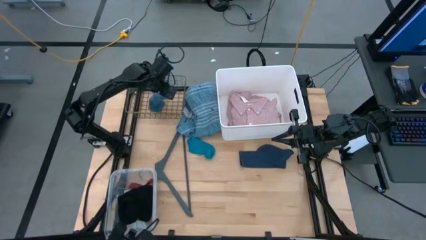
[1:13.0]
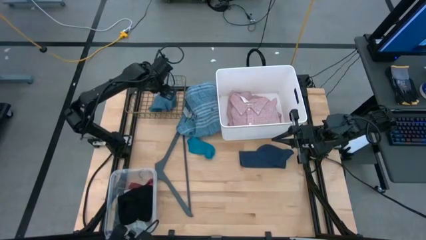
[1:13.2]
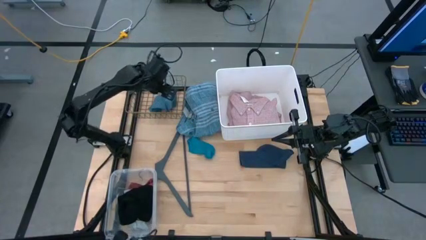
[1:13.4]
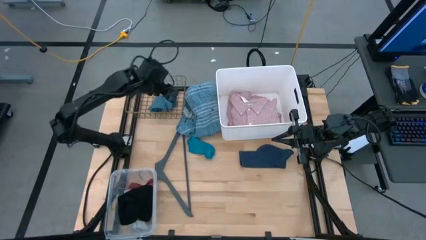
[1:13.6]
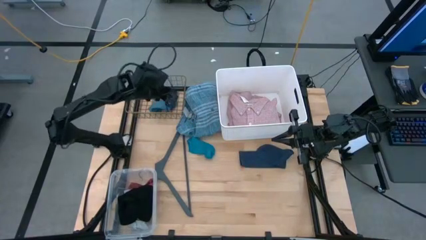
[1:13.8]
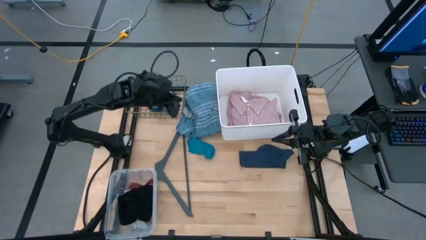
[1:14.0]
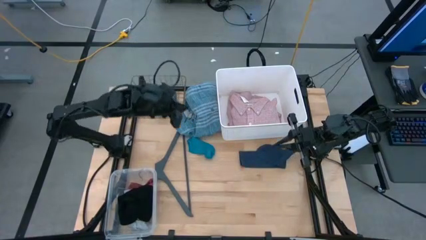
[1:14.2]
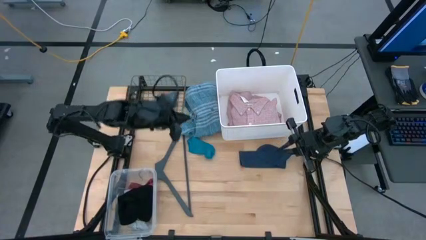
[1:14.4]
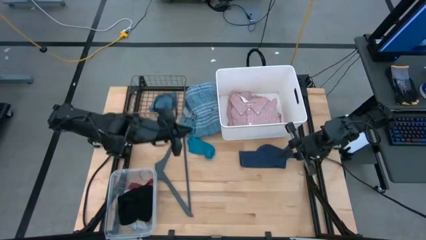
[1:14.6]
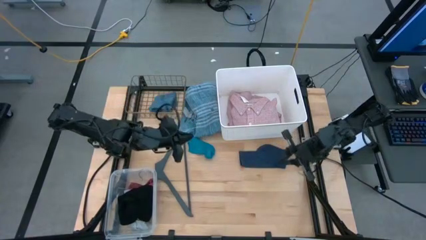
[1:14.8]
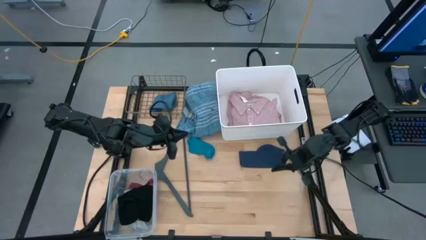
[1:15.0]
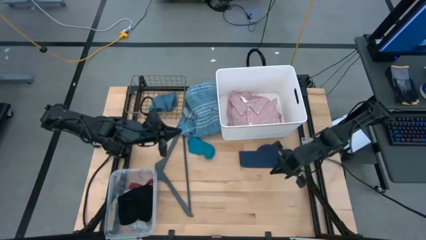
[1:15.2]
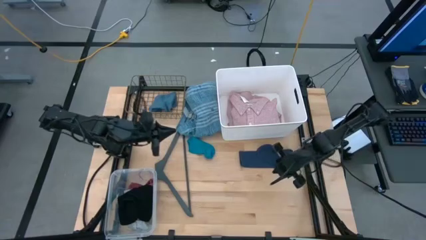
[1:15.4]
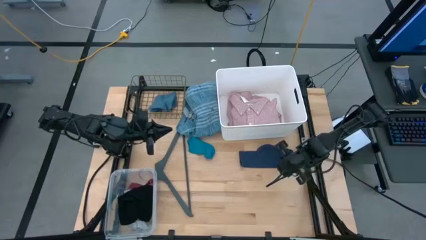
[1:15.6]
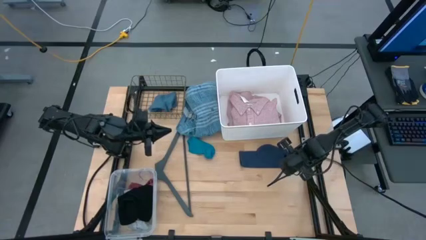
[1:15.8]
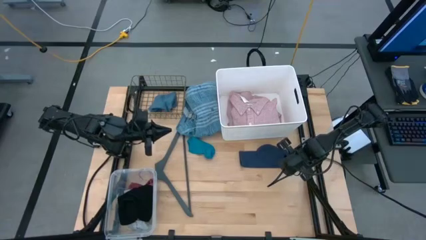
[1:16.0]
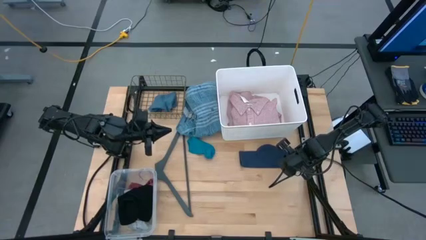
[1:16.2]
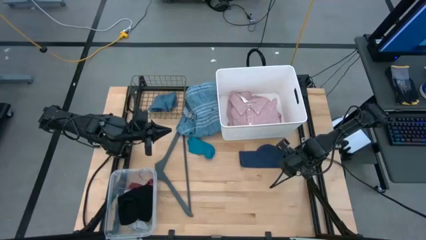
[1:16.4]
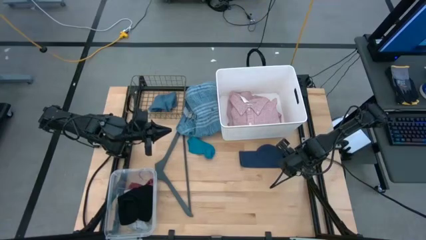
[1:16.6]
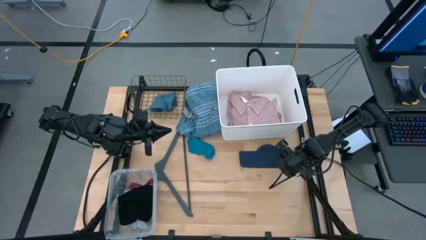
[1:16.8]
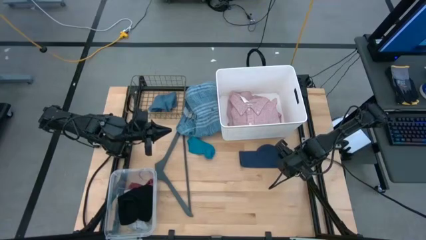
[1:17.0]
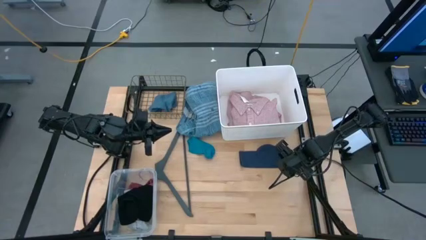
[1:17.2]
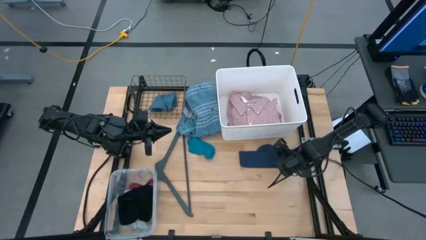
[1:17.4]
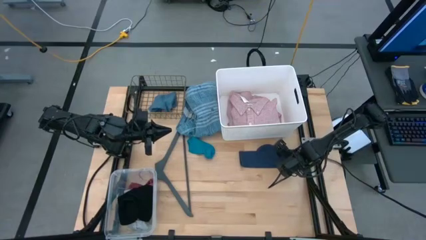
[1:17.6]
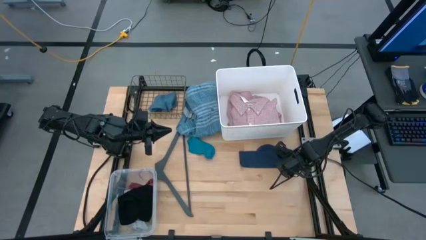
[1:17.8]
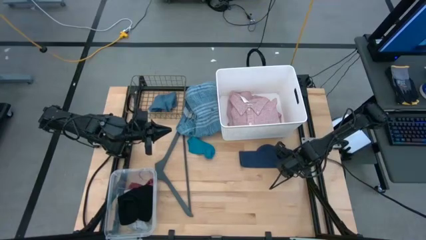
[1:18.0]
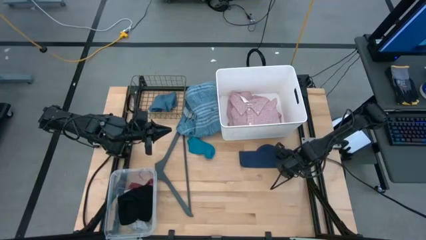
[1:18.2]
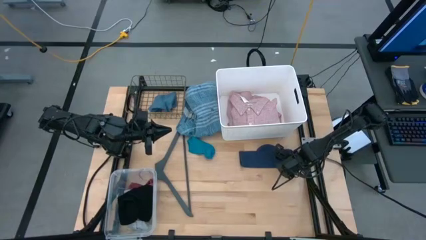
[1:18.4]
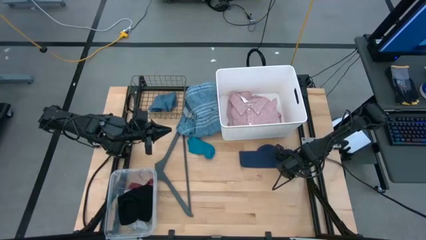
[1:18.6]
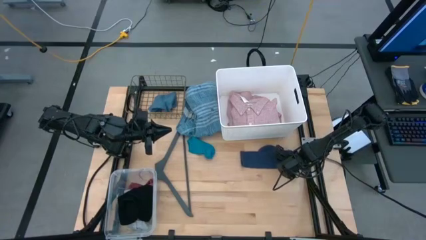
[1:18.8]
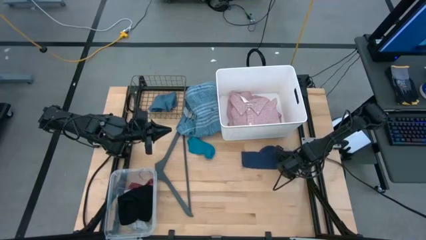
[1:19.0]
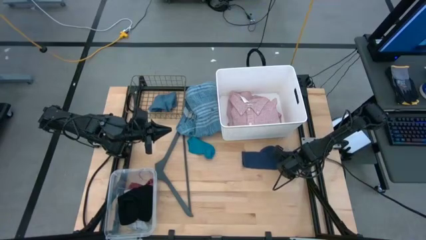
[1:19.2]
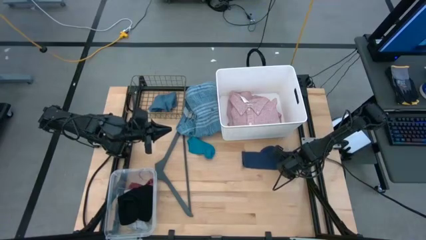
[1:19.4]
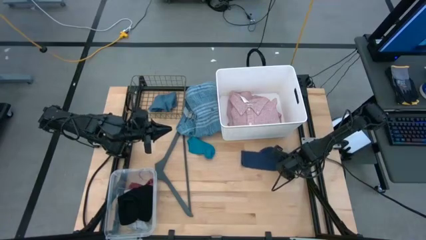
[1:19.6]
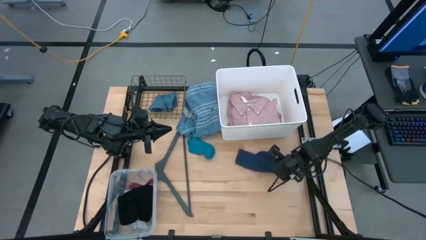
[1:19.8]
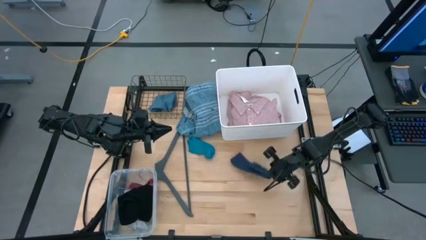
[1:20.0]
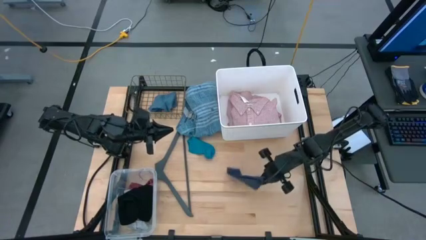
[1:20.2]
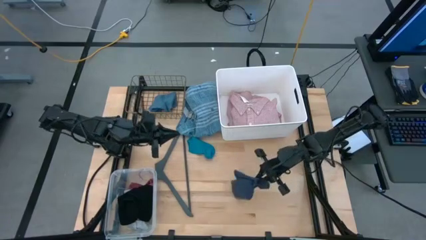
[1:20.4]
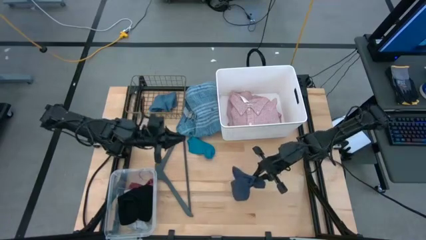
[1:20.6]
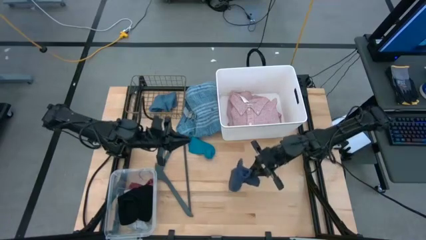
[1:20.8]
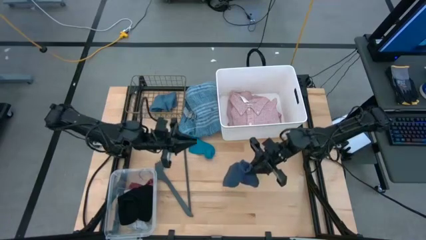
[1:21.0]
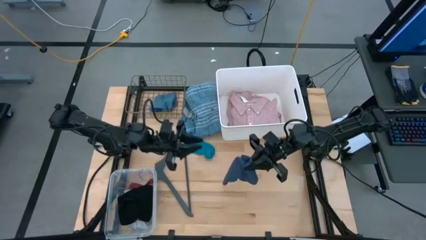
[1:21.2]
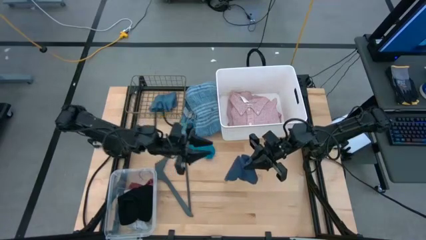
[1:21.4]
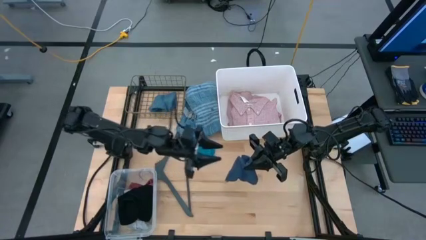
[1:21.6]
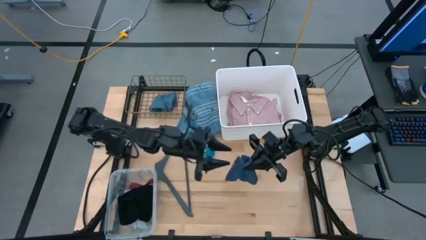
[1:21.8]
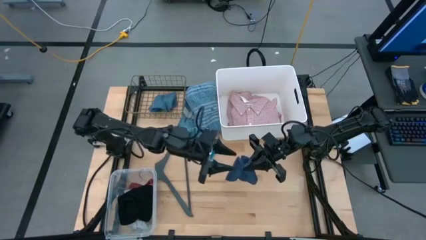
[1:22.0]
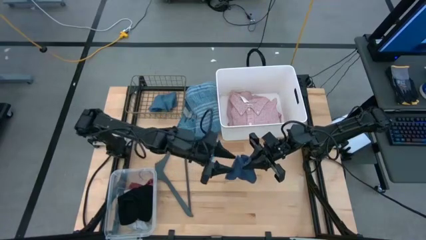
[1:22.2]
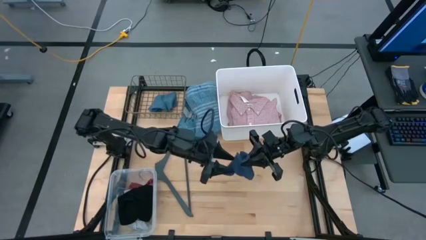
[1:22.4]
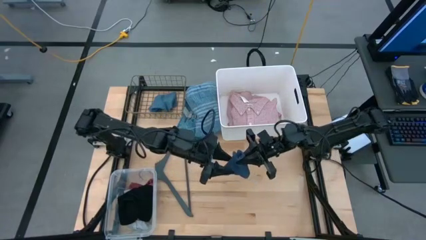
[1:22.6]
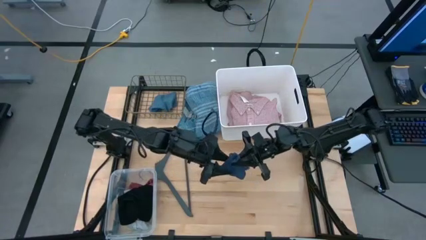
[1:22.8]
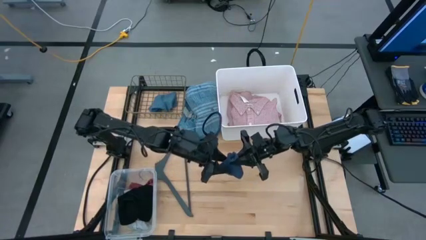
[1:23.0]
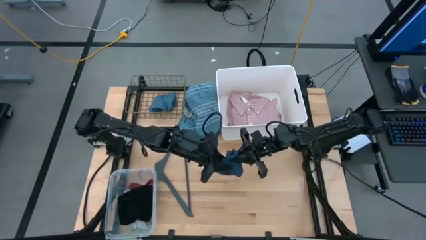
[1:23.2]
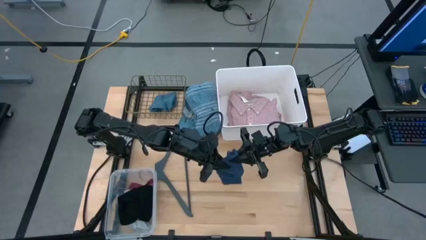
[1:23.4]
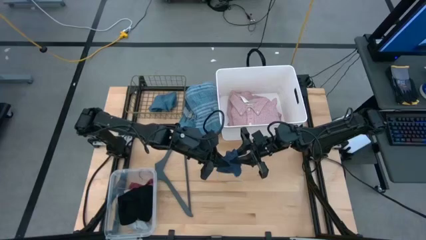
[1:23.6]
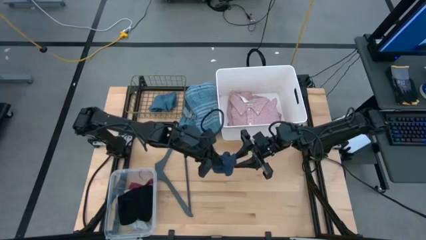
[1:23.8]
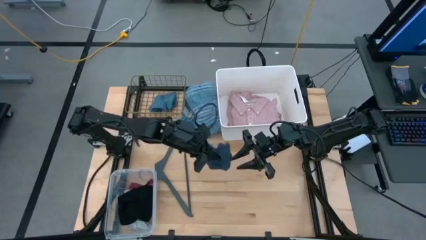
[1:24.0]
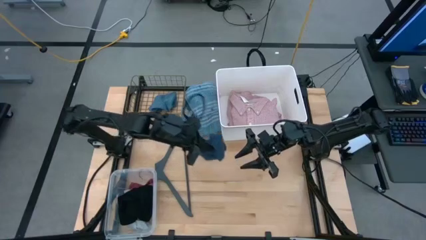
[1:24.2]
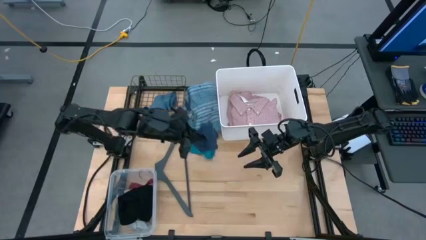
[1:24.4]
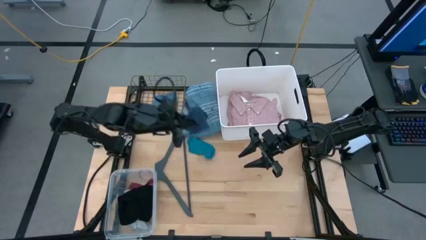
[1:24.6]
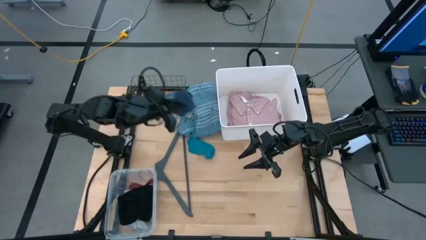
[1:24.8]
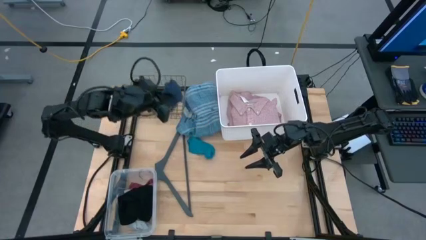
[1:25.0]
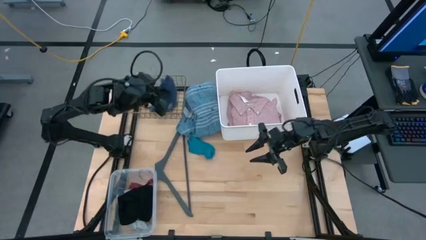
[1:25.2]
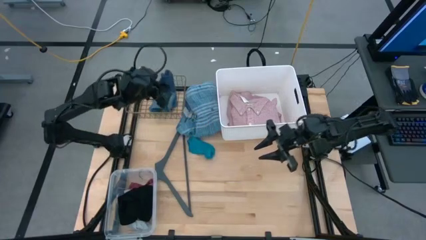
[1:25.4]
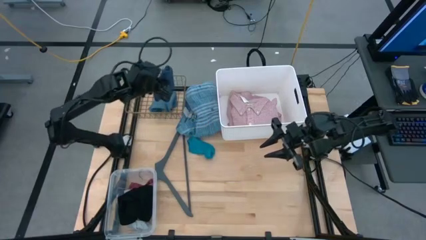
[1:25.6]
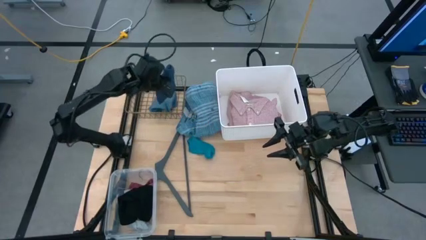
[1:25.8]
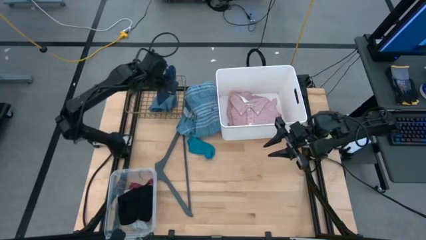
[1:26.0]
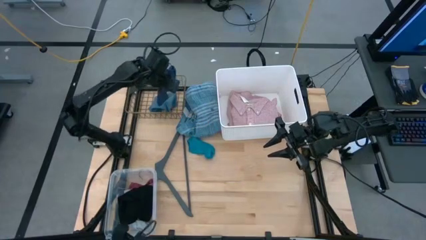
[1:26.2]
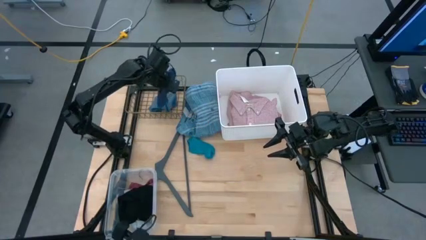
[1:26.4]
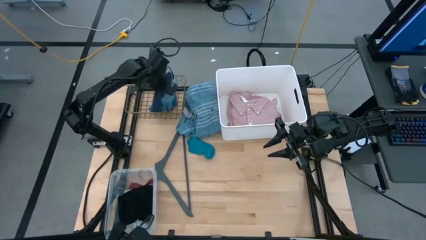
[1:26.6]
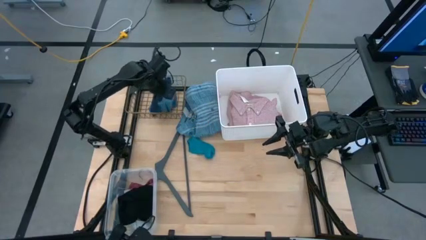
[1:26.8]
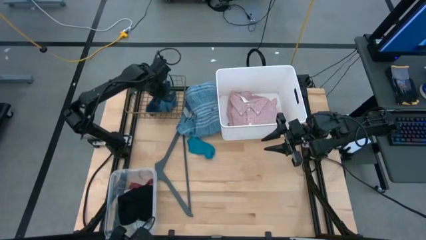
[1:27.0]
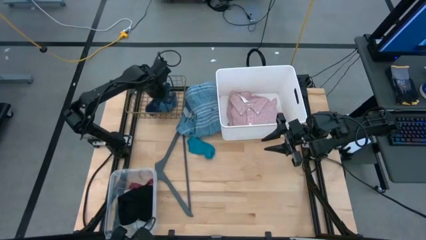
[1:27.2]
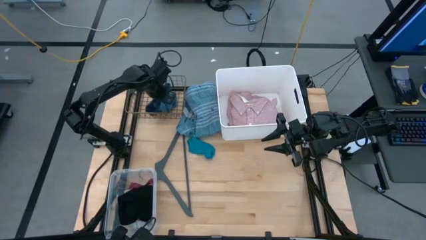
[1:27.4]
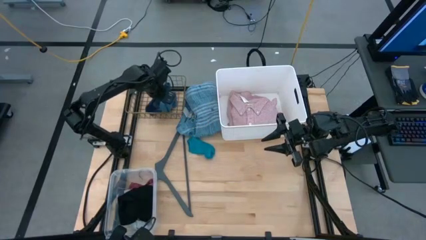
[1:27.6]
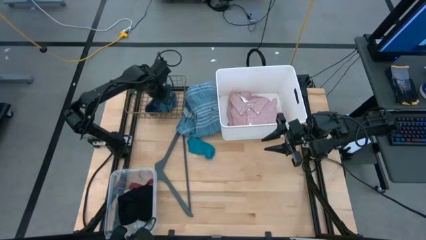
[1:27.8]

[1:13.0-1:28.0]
Task: Pick & Place Cloths
Put the blue sock into the gold wire basket

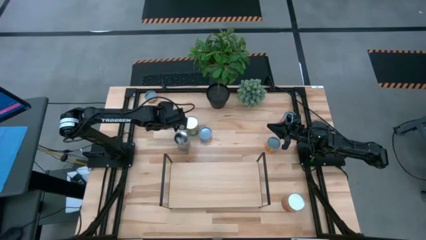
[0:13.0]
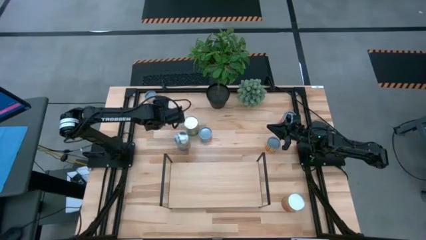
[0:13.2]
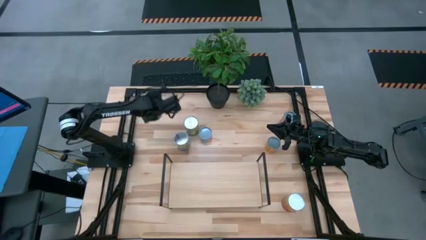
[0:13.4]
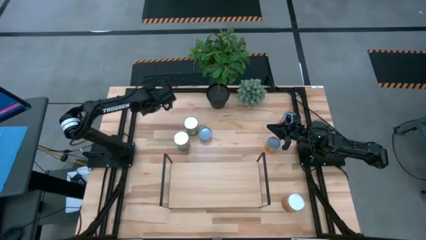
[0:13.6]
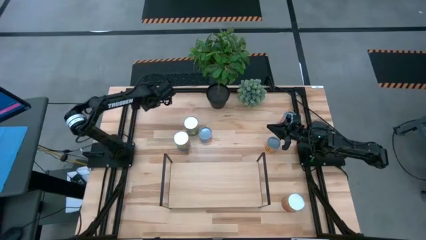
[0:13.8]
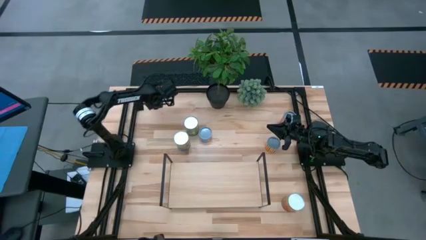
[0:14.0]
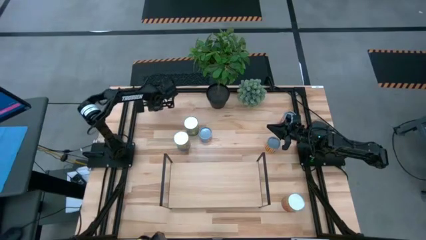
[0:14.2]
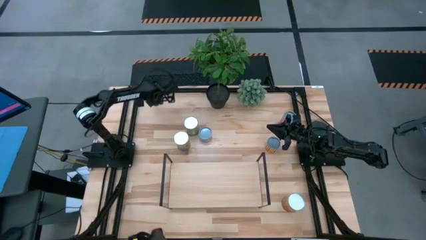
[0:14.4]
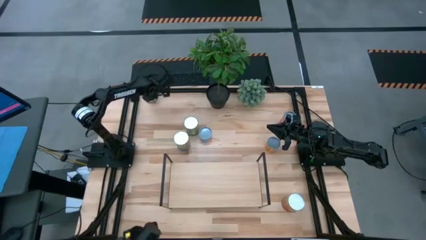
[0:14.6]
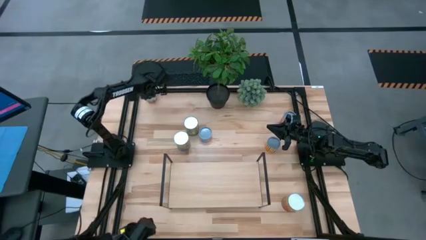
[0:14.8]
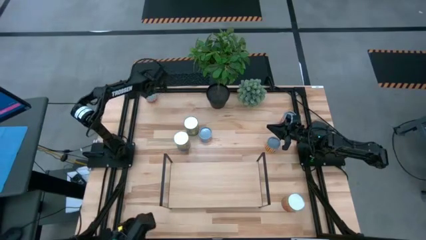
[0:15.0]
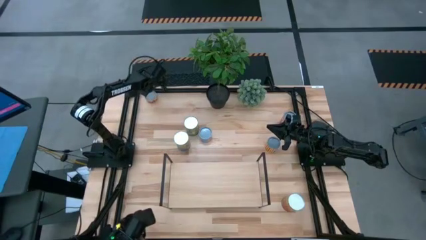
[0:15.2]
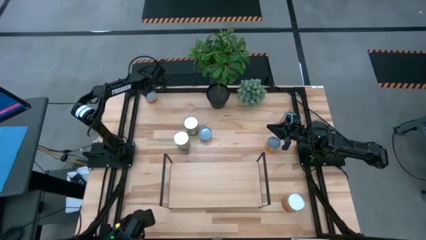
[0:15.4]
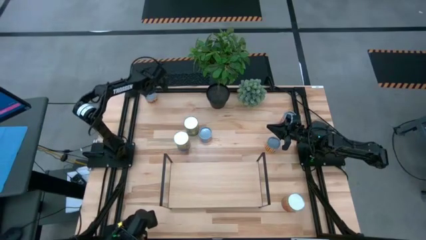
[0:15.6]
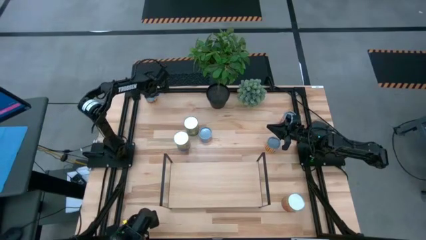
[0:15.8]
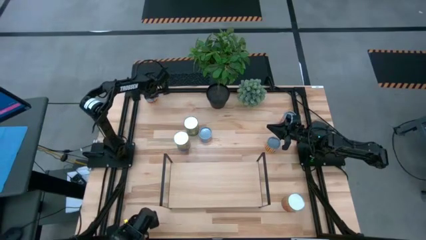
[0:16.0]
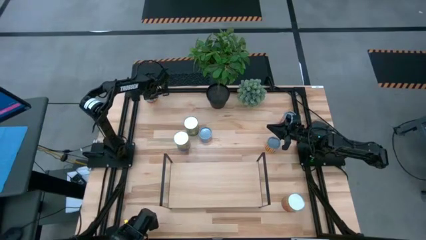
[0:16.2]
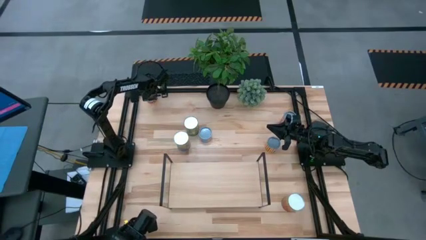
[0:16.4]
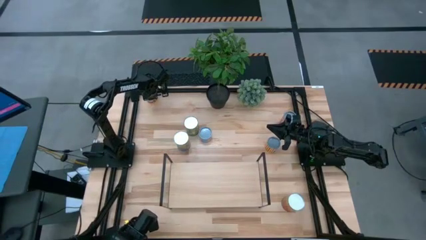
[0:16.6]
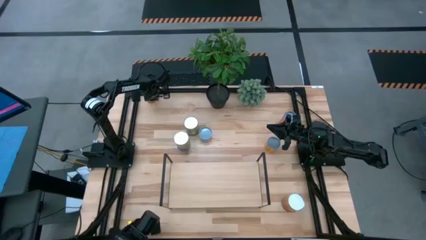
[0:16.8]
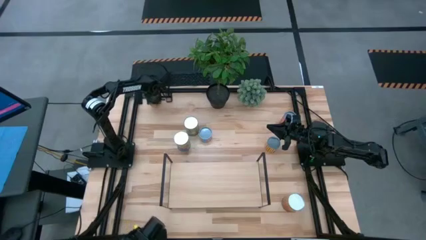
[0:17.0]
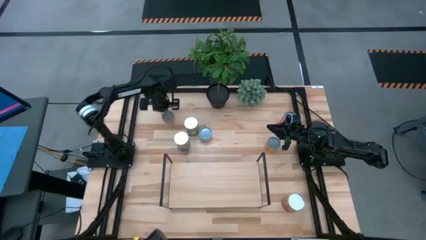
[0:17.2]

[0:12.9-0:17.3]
Task: Pick and place cans onto a shelf
Adjust the yellow pineapple can
